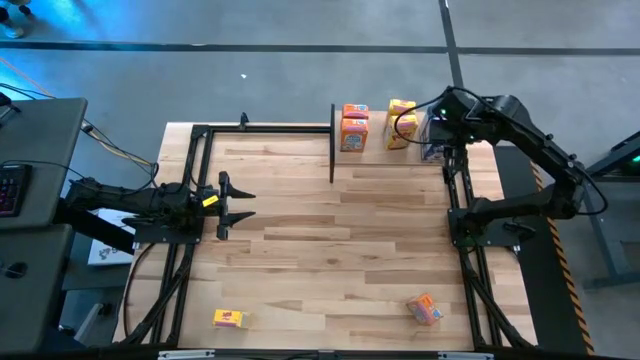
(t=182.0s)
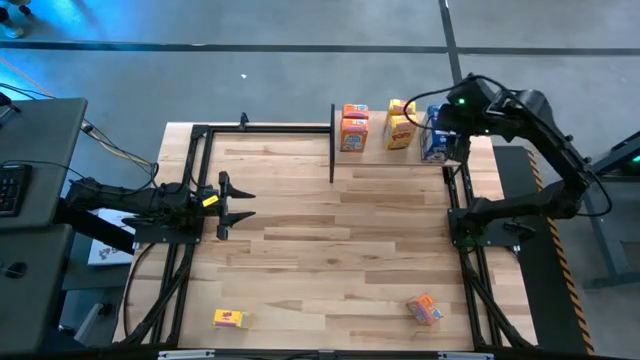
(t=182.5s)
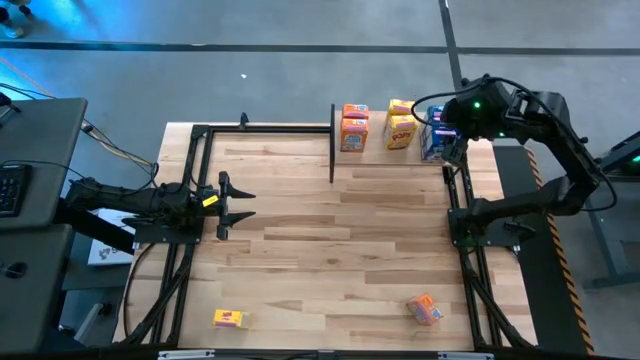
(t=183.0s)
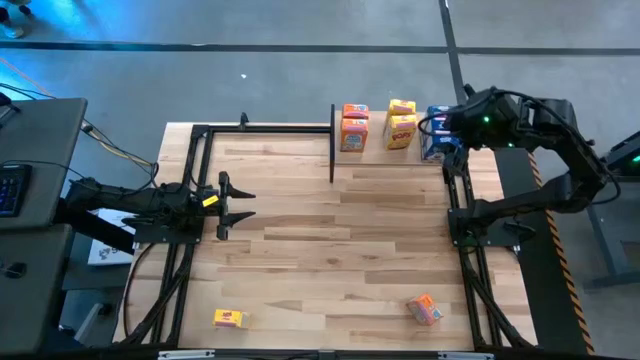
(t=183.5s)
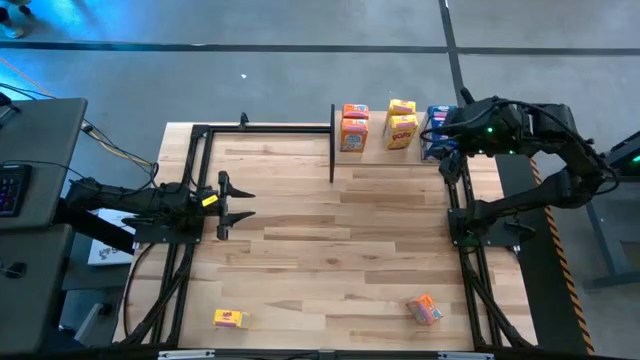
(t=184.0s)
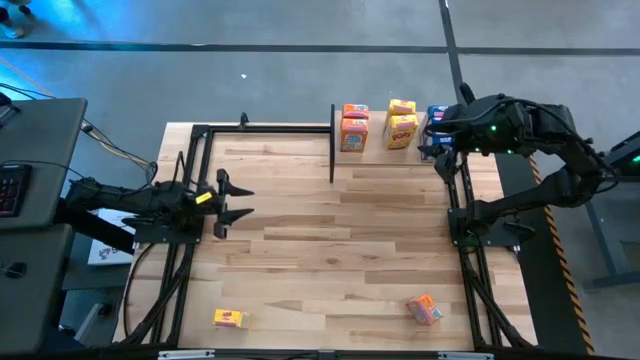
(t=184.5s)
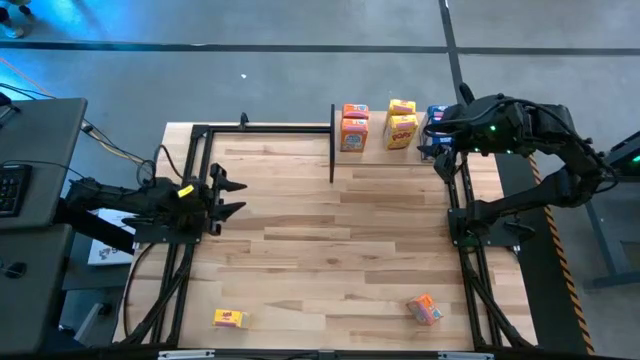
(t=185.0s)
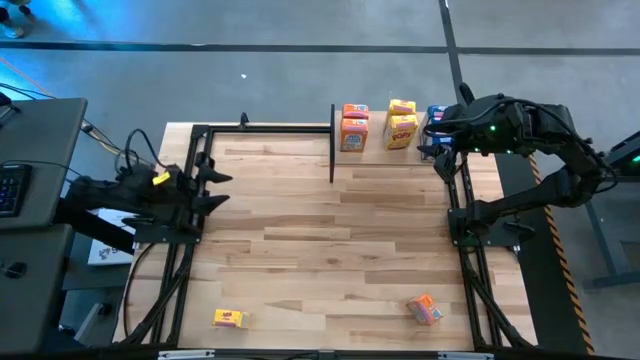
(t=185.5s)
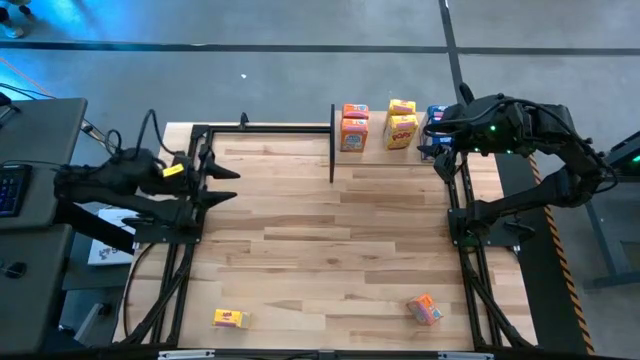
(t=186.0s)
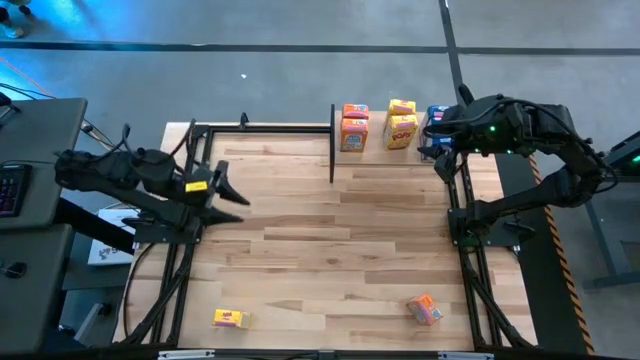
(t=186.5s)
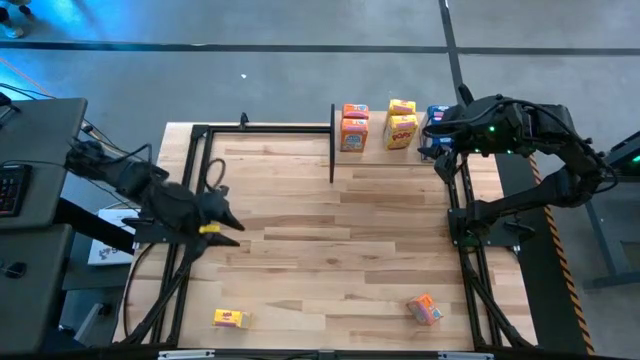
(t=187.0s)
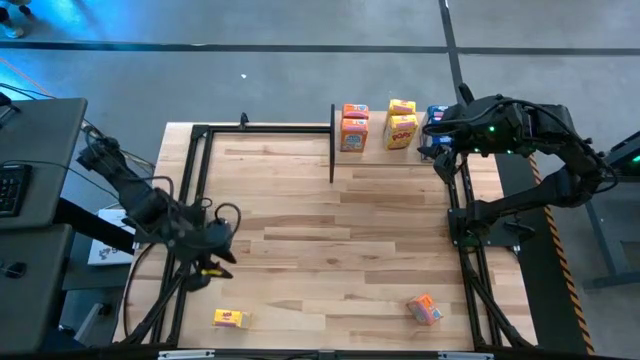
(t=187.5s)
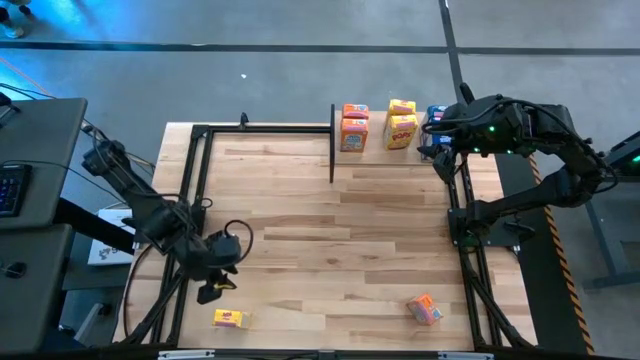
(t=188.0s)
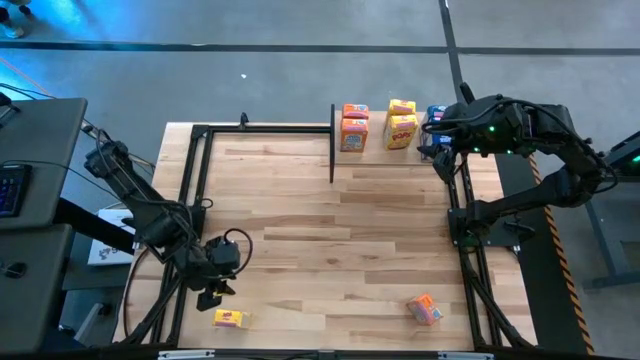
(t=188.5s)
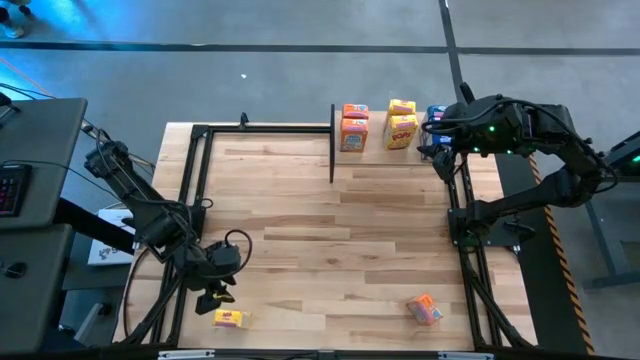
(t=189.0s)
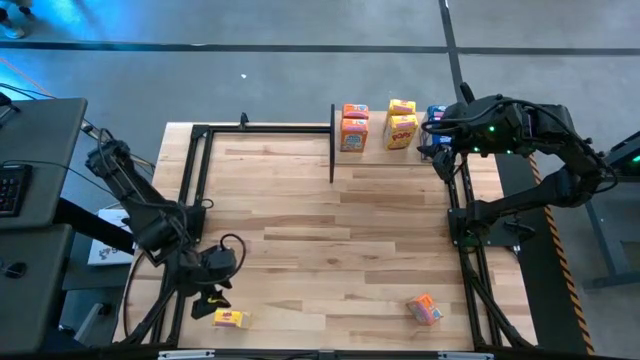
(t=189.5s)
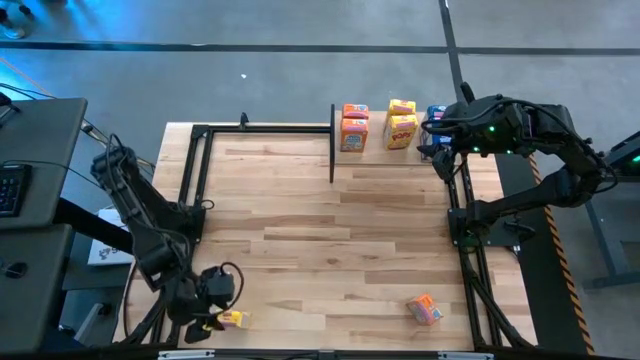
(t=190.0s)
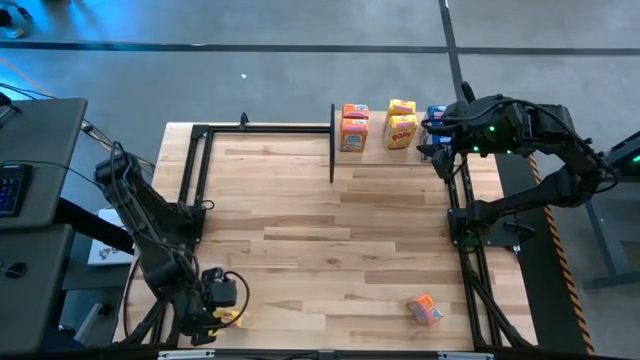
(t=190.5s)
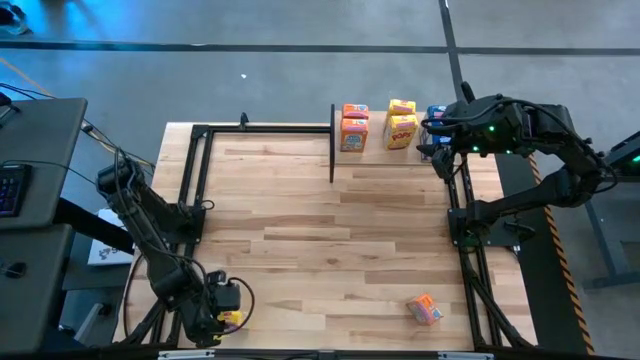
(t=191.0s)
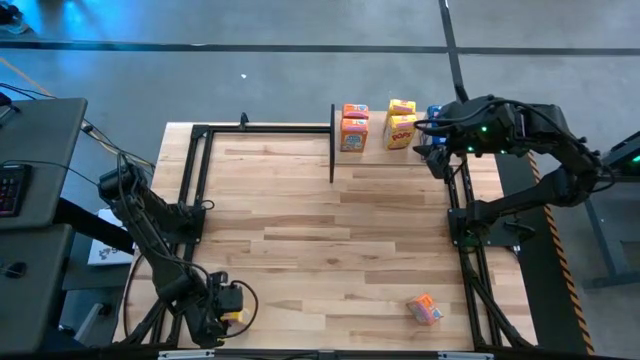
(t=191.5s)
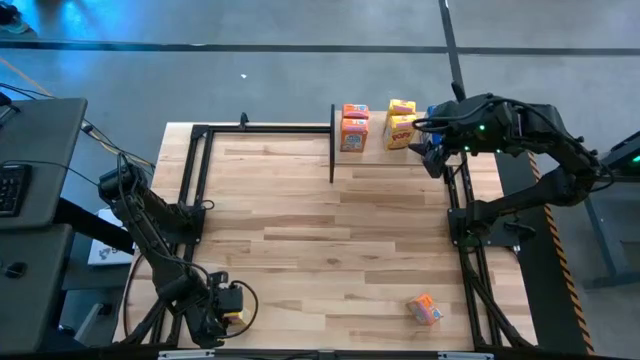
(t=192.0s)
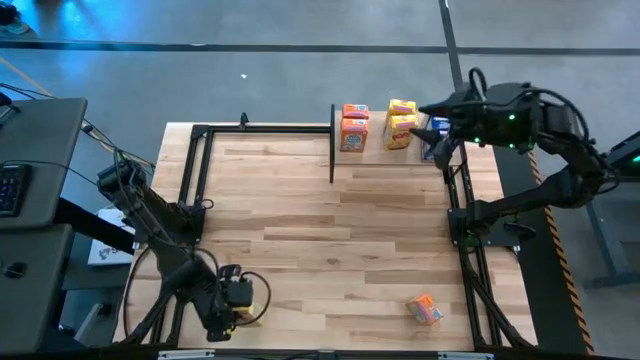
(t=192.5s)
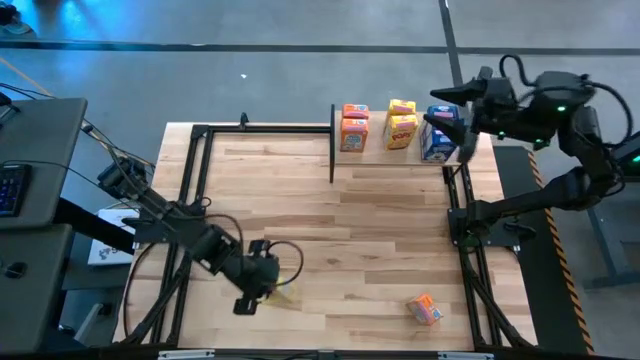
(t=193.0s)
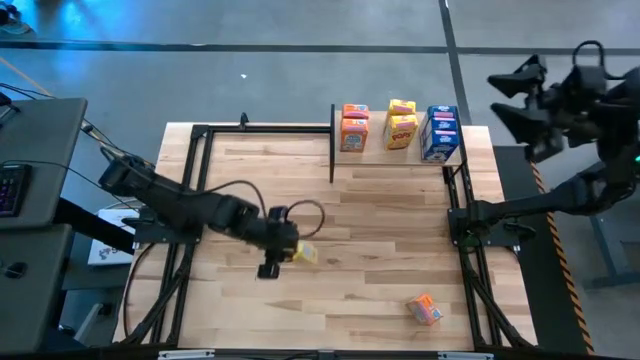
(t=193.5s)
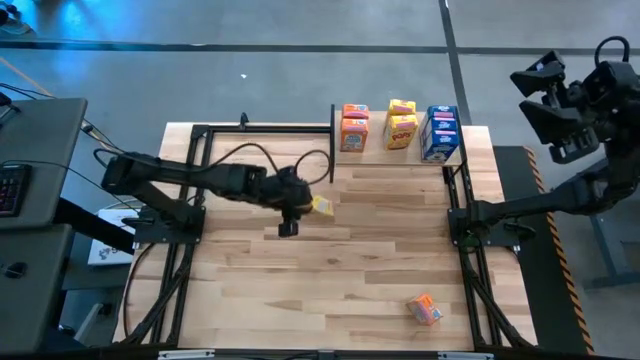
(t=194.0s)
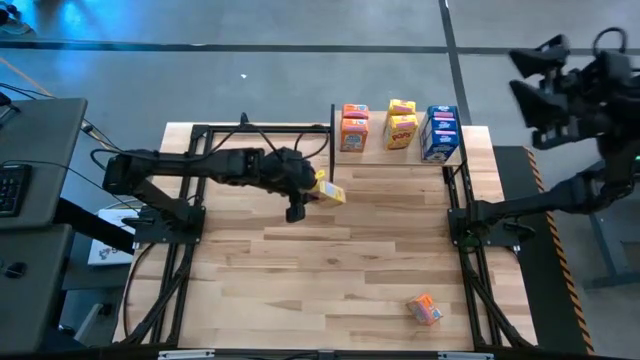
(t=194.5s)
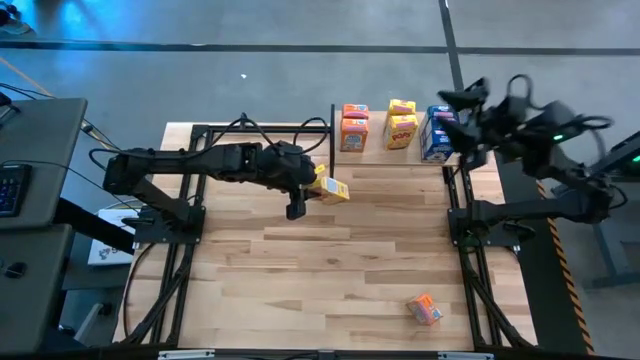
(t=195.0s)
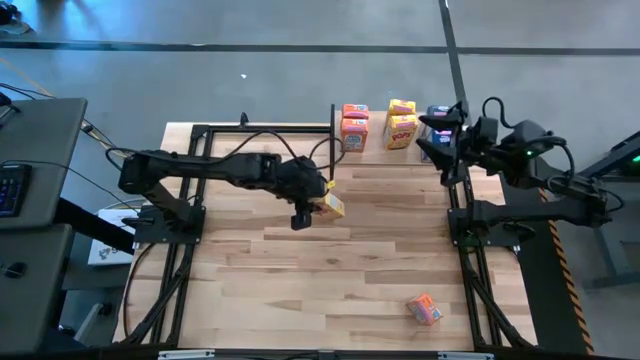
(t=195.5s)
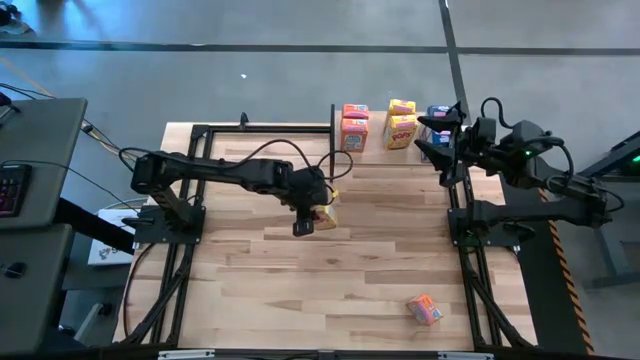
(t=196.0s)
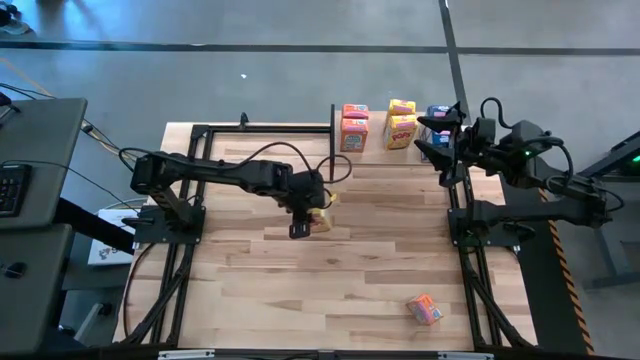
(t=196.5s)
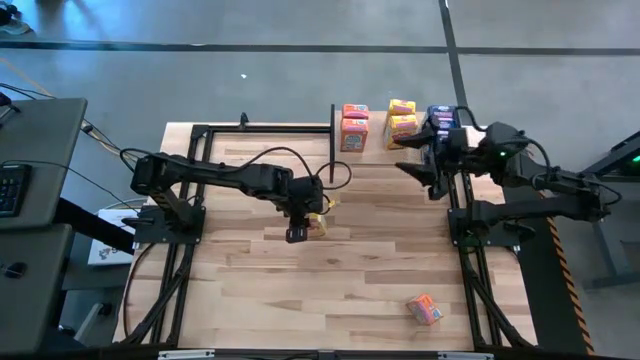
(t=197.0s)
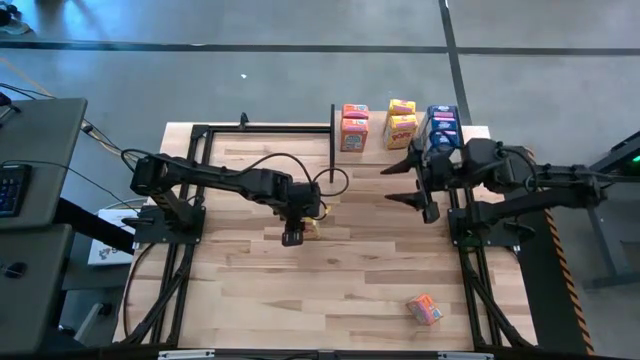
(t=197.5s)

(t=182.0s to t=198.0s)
Task: Stack cereal on shelf
Put the yellow cereal box on the shelf aligned with the other yellow cereal boxes

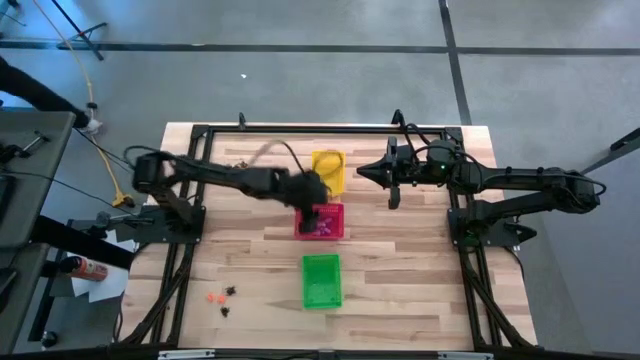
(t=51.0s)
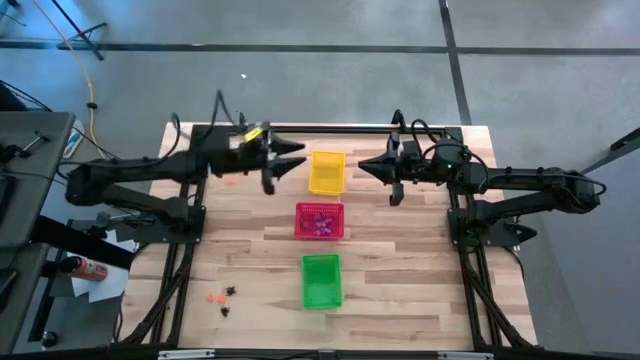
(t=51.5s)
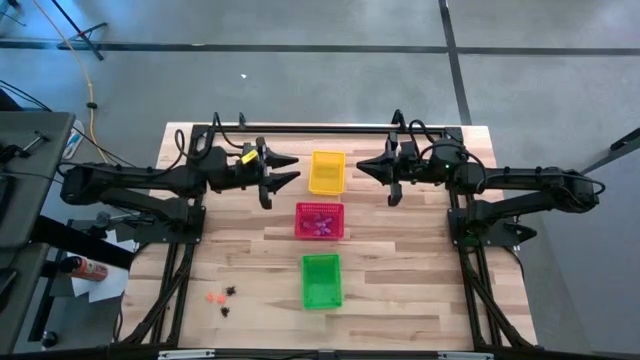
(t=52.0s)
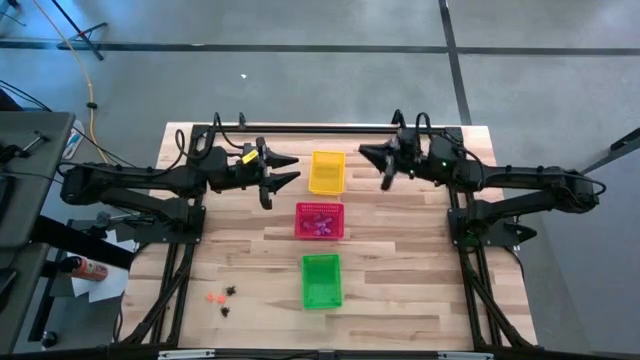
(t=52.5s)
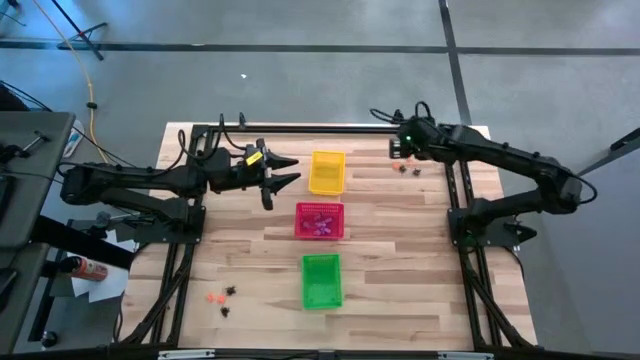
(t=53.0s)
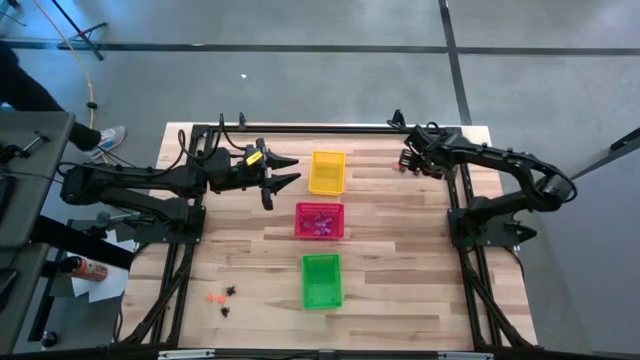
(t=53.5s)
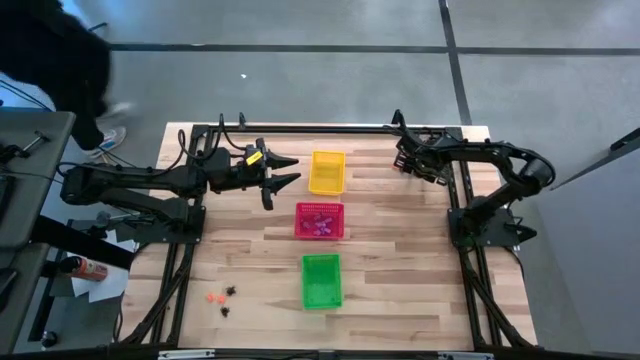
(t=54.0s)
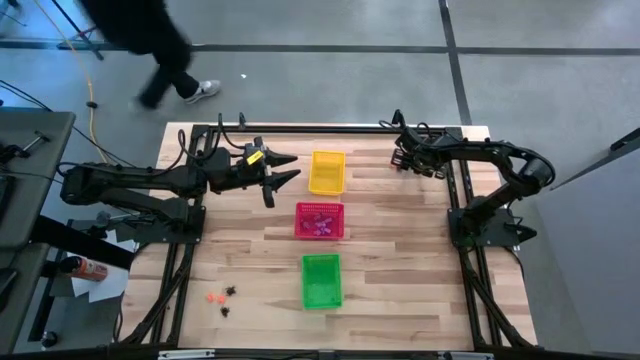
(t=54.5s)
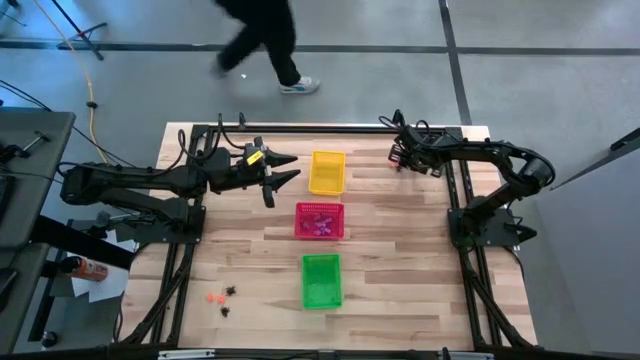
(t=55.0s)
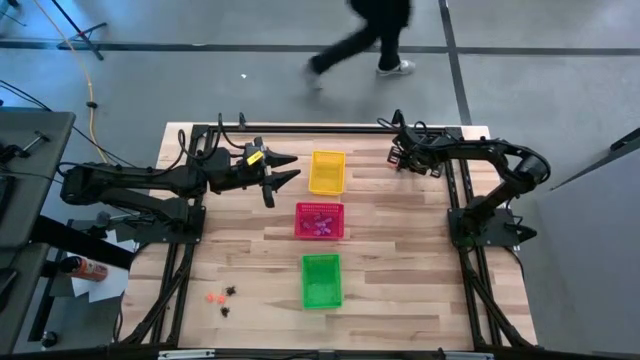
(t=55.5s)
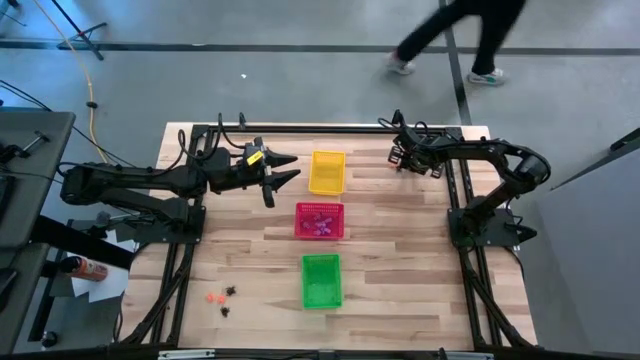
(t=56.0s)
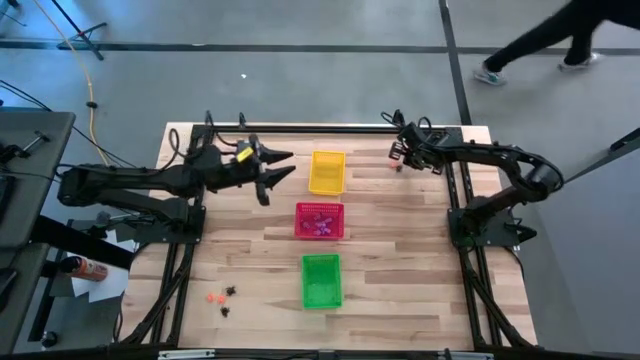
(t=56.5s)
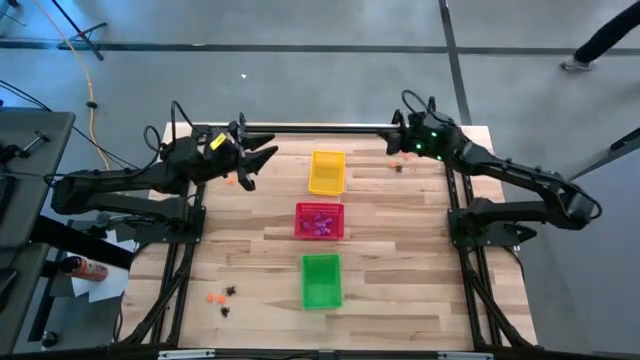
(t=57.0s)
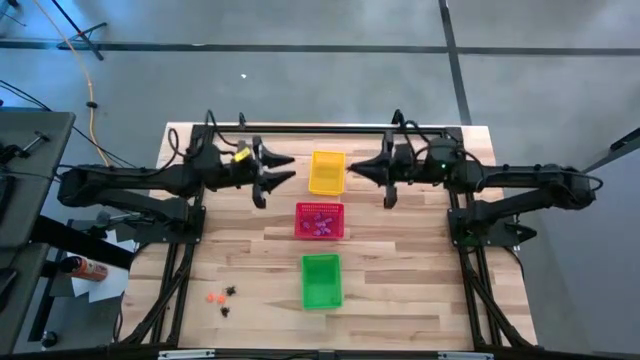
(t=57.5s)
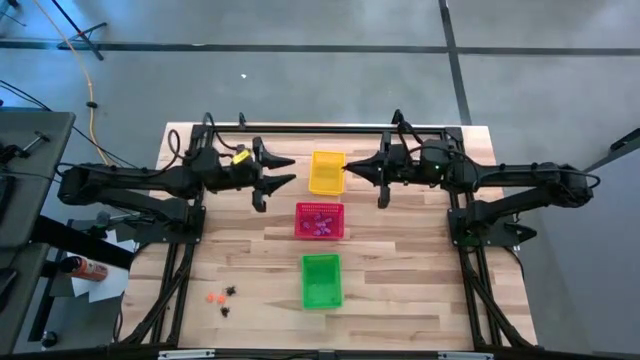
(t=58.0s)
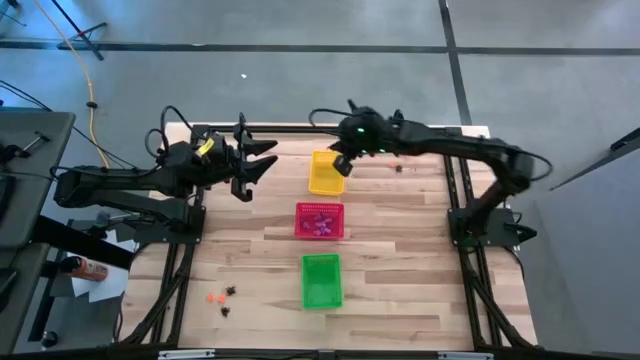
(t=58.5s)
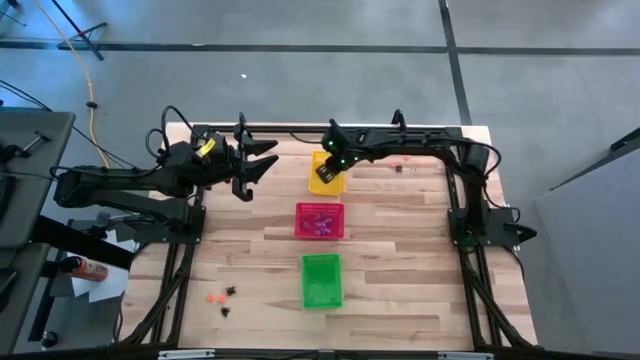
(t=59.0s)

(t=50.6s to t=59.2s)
Task: Sort Halloween decoration
Put the black spider toy into the yellow bin
